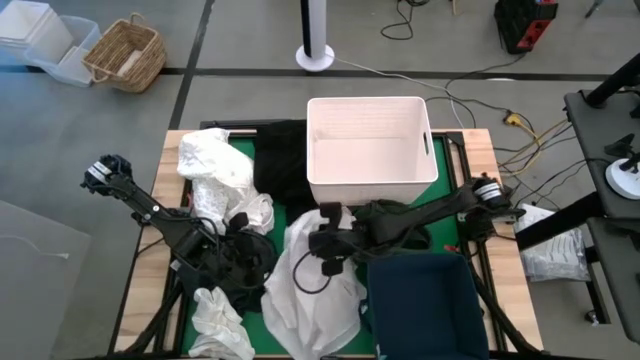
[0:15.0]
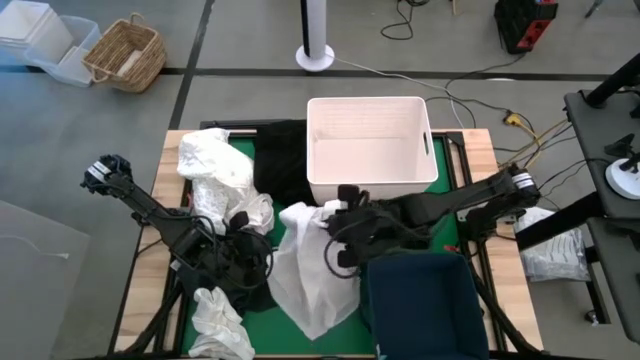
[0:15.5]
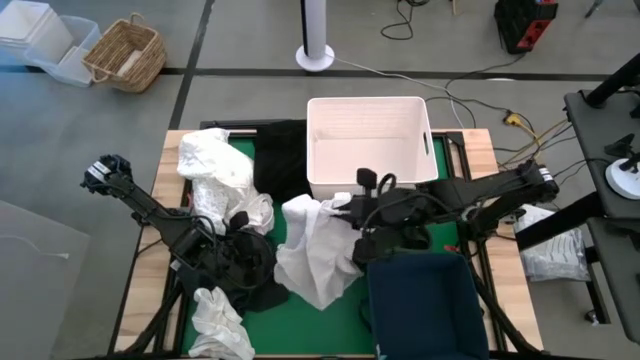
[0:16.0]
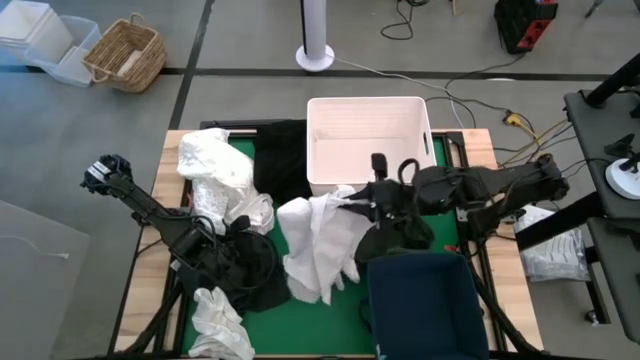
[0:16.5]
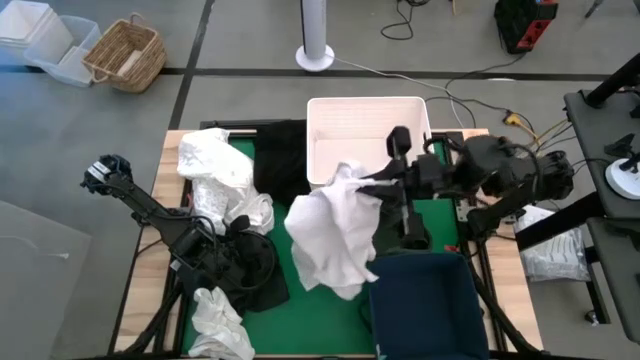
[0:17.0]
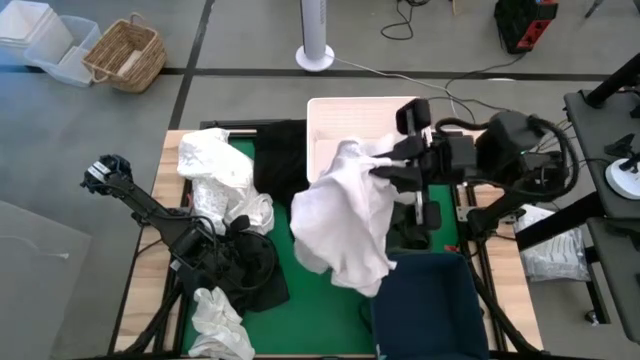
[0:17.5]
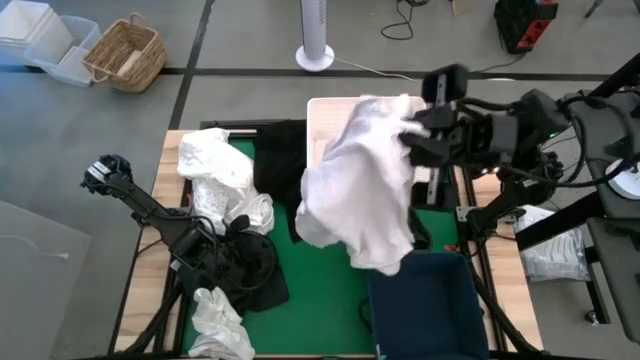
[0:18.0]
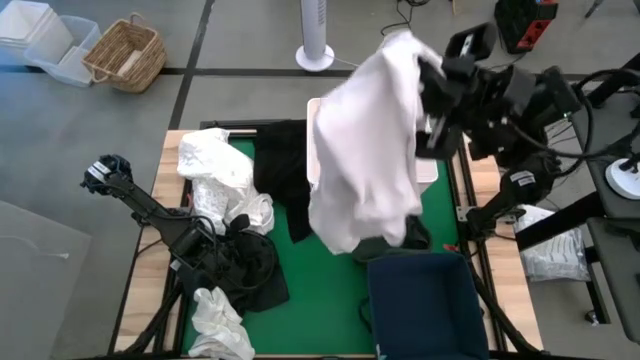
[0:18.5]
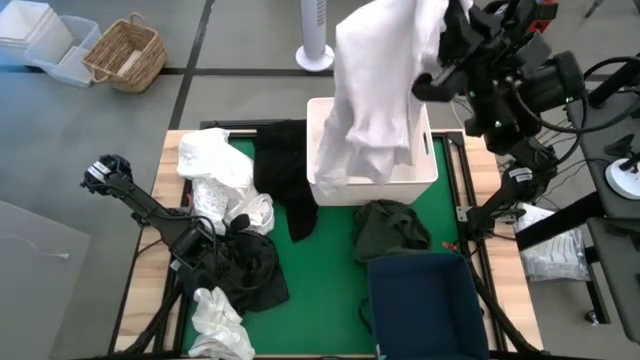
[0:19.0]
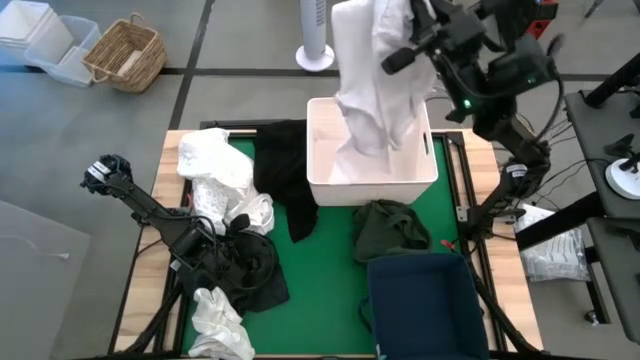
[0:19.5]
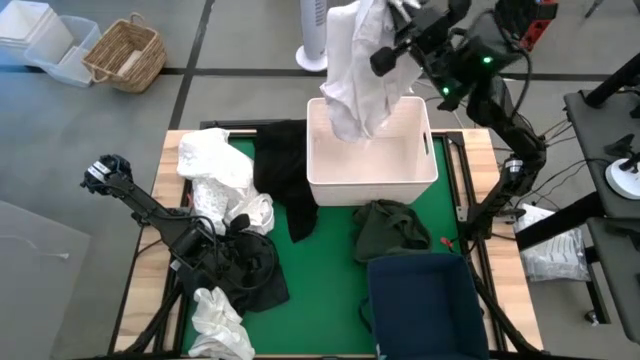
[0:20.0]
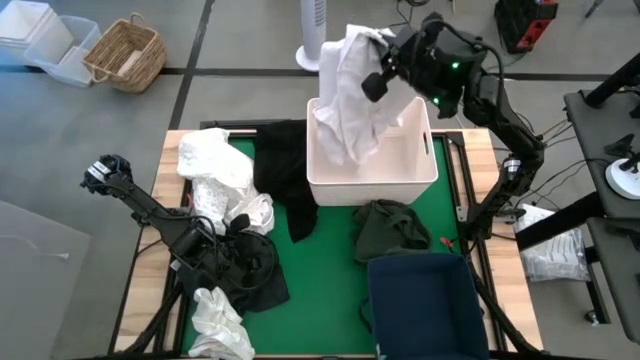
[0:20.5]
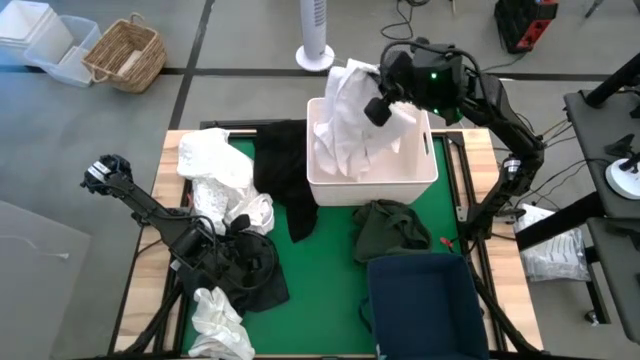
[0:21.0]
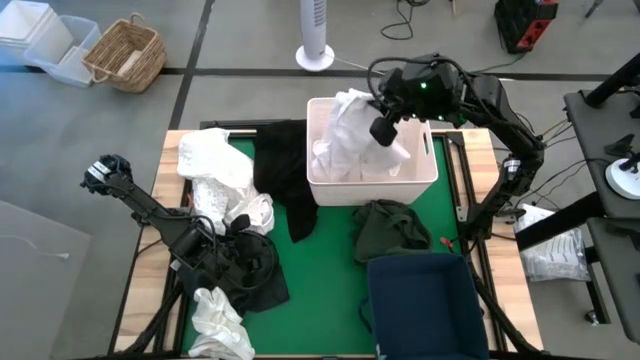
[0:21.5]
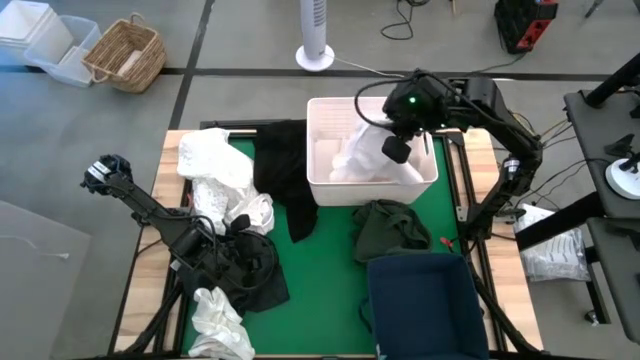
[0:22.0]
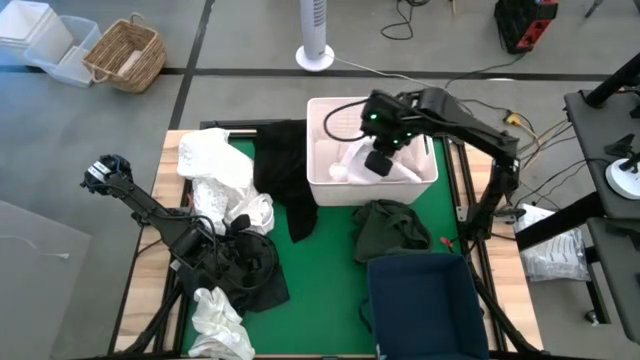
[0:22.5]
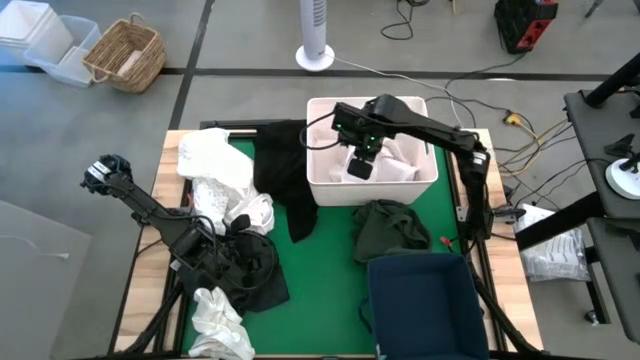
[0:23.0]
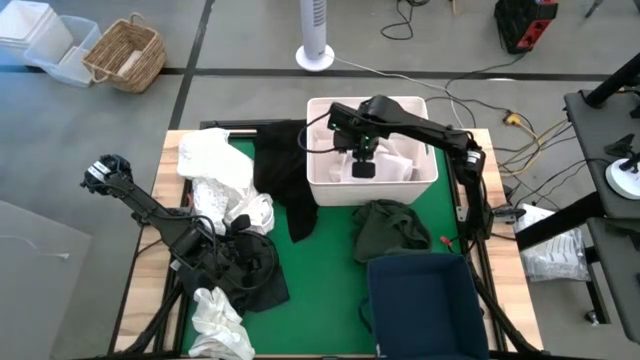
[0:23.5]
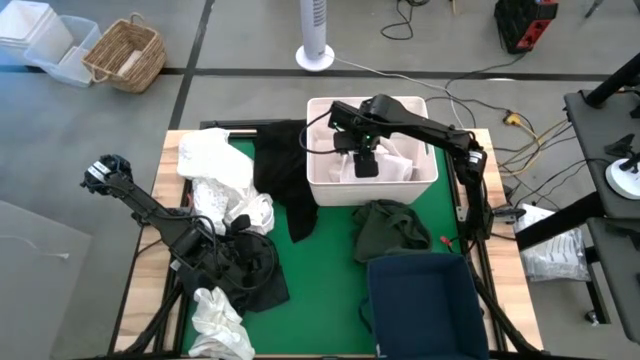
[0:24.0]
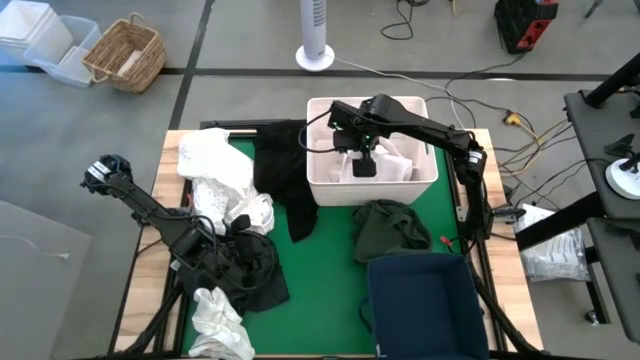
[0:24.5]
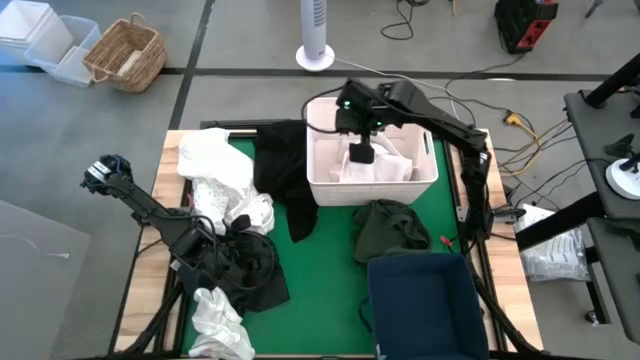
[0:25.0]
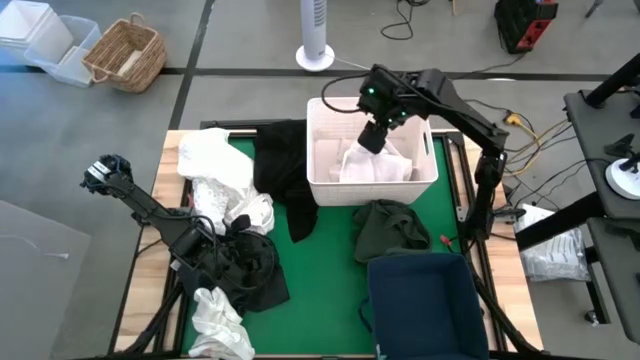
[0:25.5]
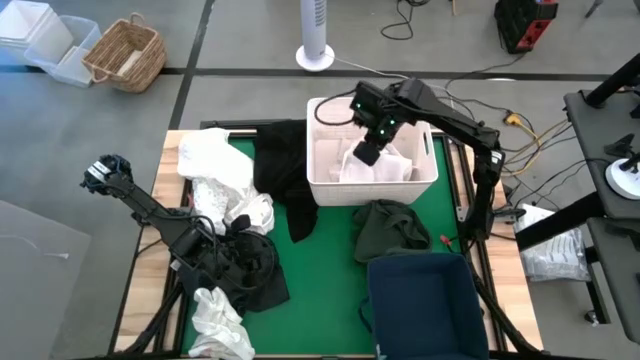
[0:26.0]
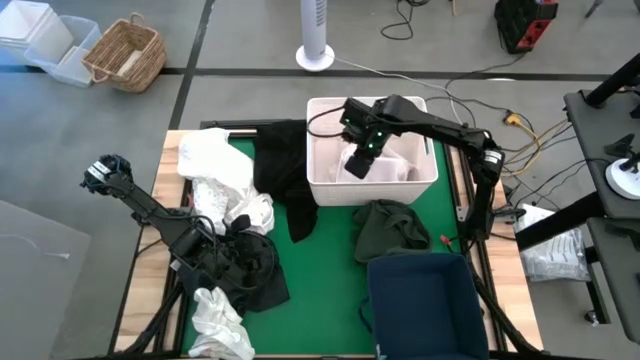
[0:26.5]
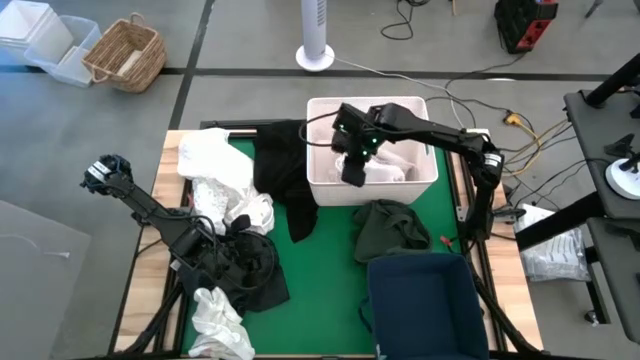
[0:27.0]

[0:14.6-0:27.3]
Put the white long sleeve shirt into the white laundry bin
